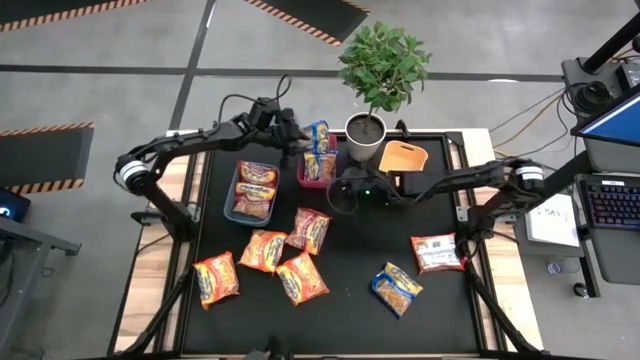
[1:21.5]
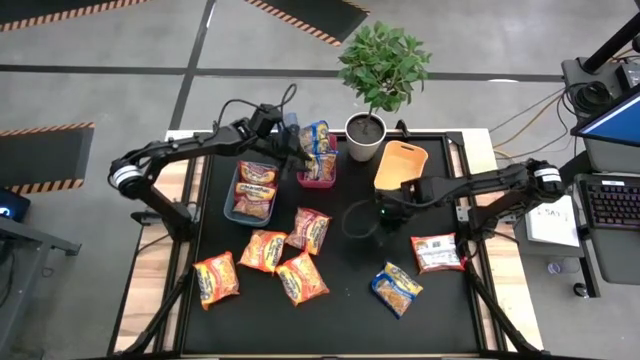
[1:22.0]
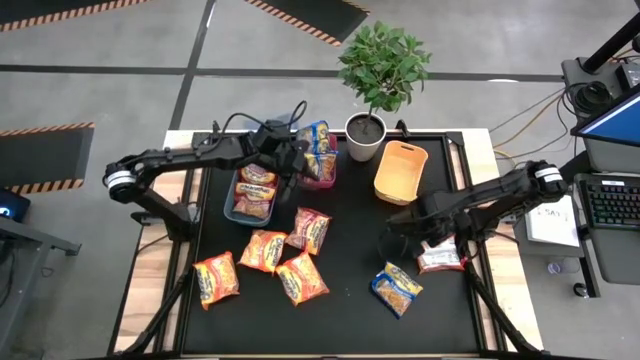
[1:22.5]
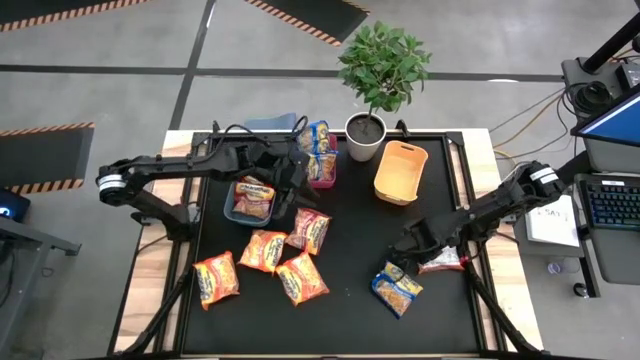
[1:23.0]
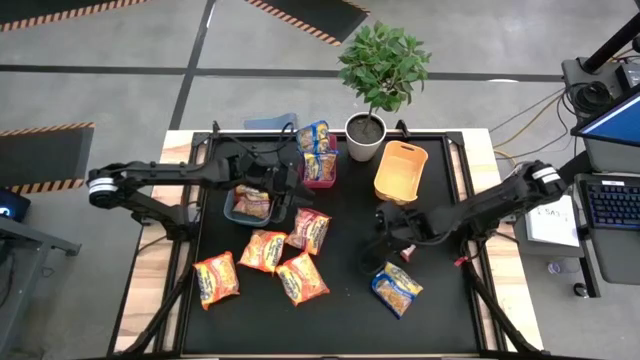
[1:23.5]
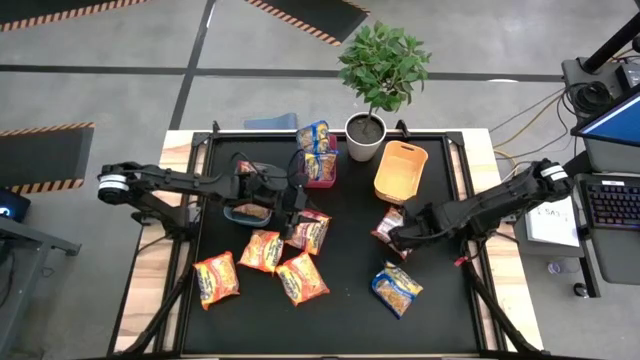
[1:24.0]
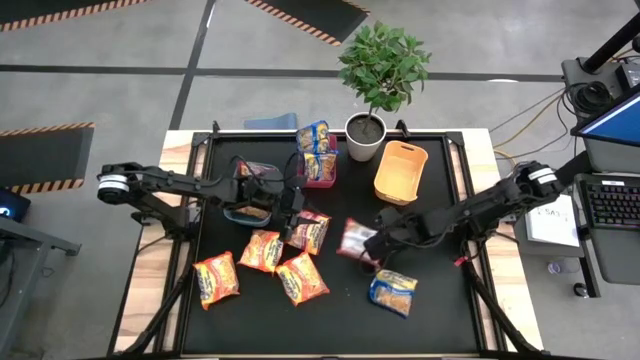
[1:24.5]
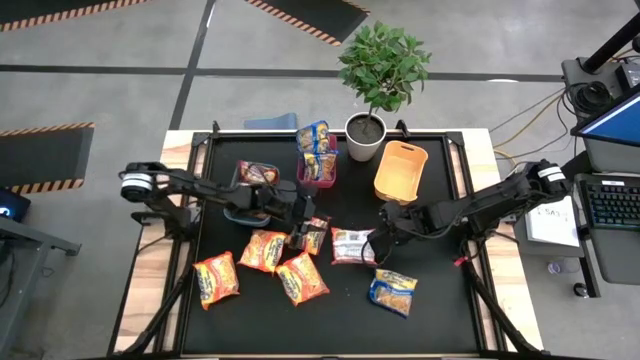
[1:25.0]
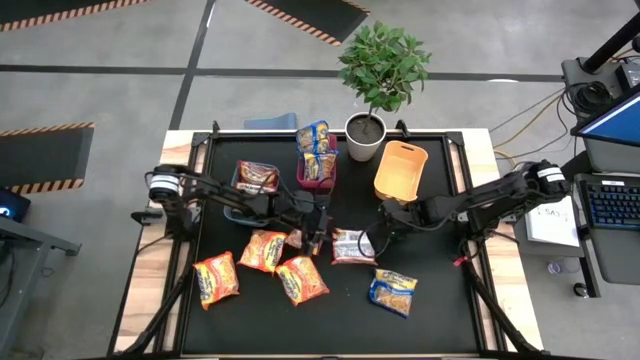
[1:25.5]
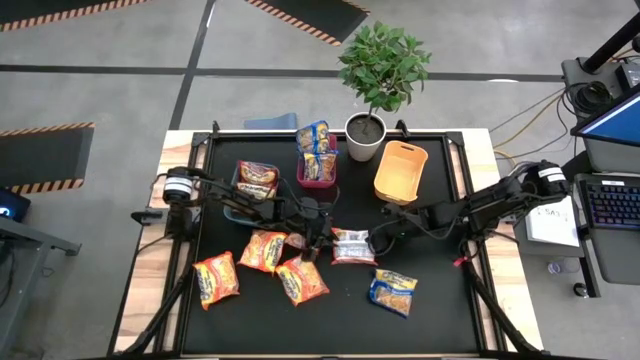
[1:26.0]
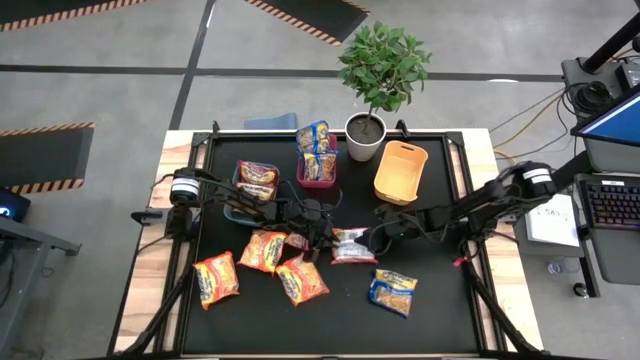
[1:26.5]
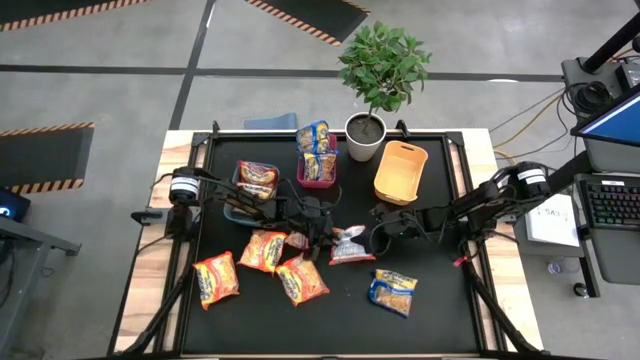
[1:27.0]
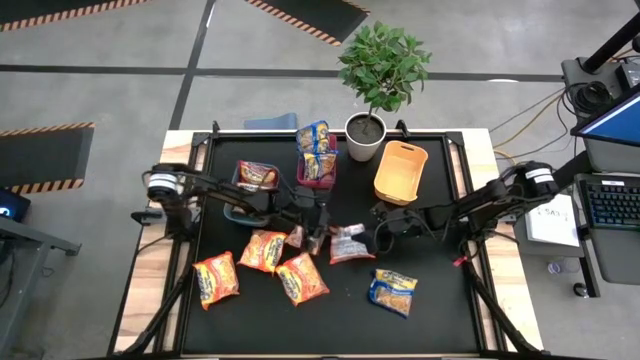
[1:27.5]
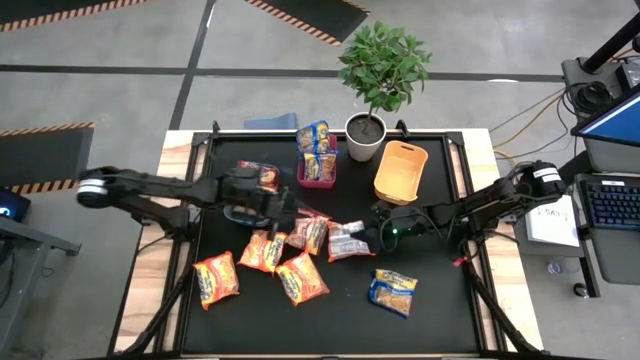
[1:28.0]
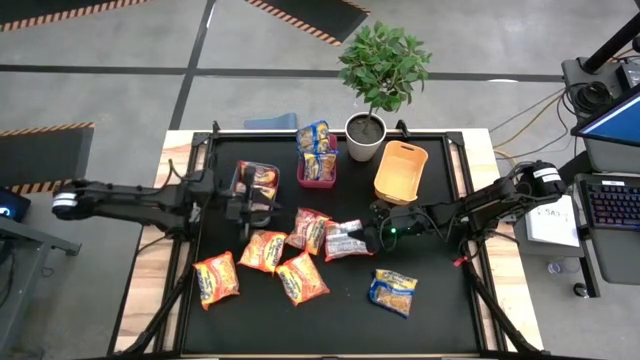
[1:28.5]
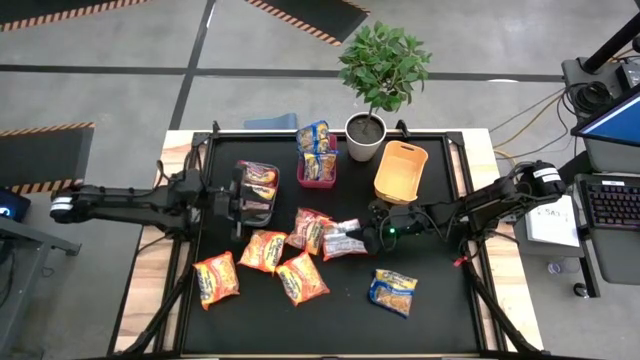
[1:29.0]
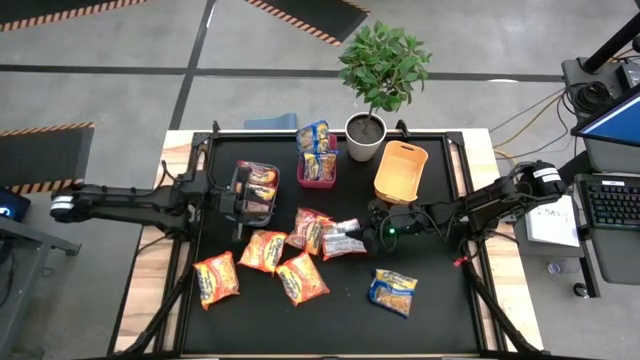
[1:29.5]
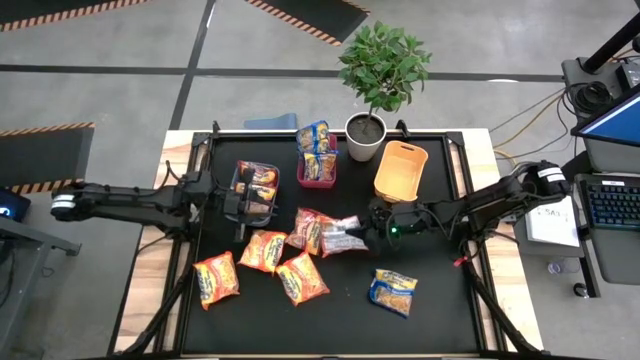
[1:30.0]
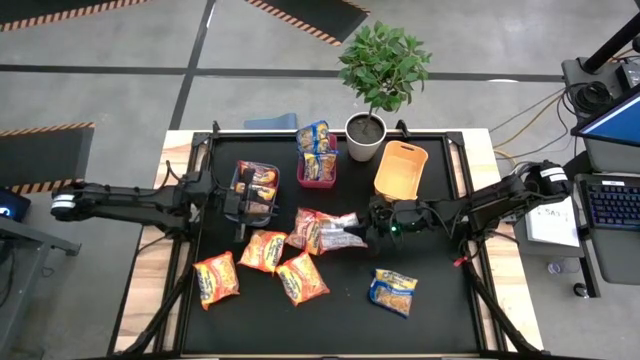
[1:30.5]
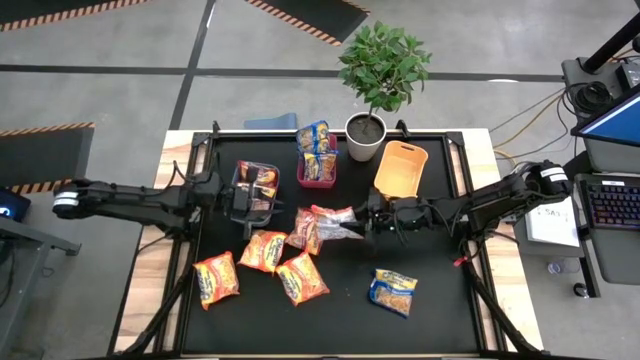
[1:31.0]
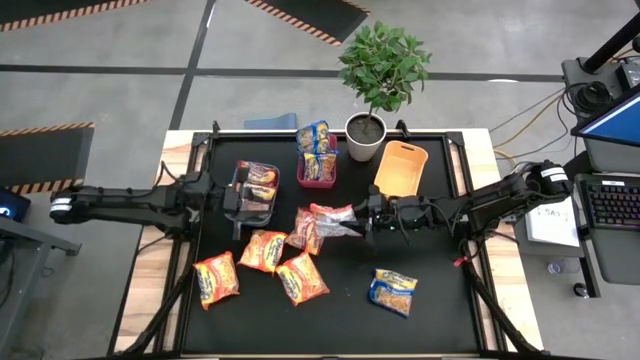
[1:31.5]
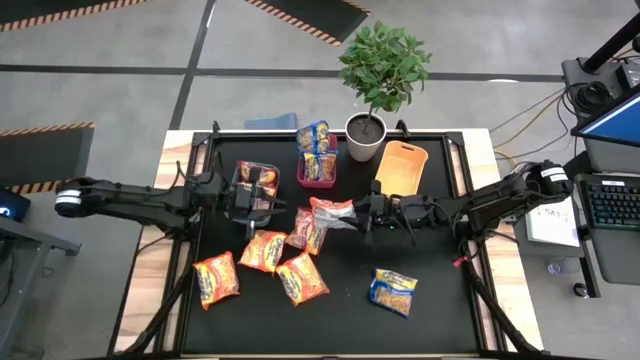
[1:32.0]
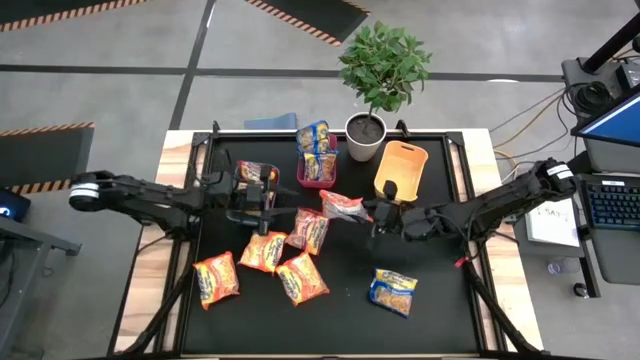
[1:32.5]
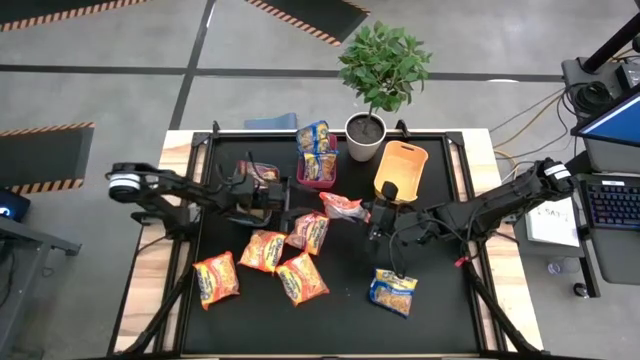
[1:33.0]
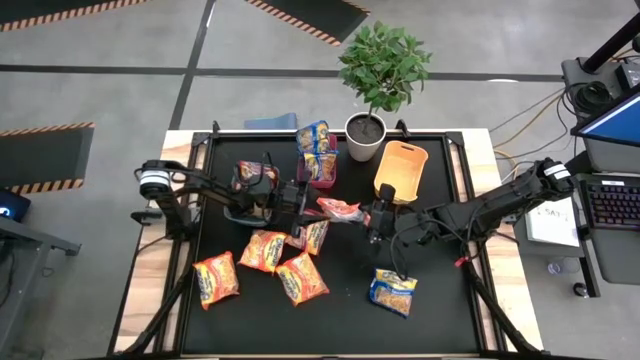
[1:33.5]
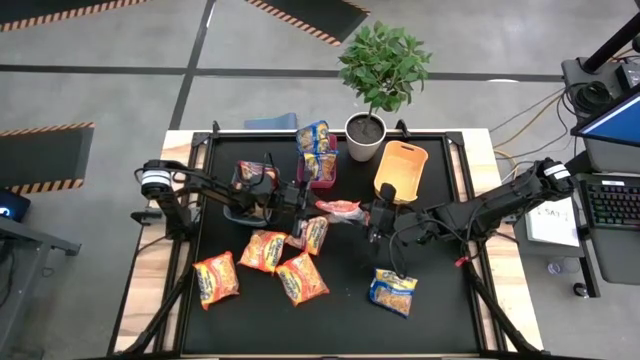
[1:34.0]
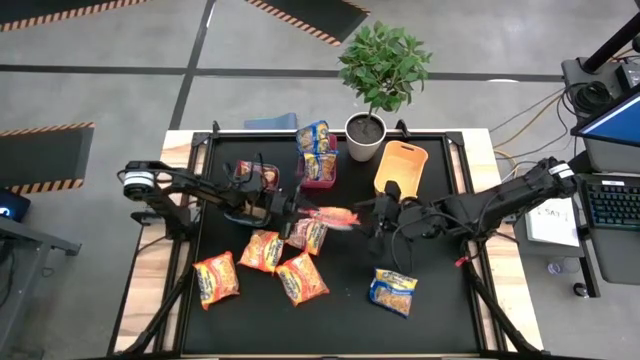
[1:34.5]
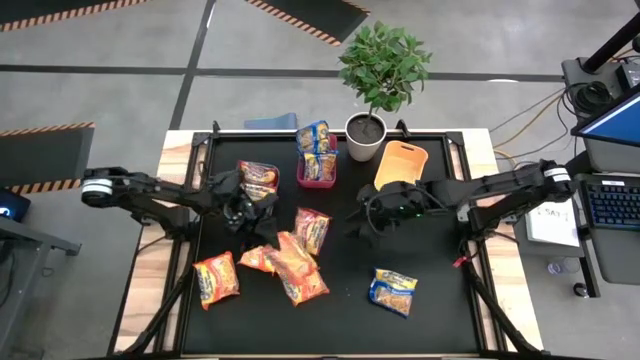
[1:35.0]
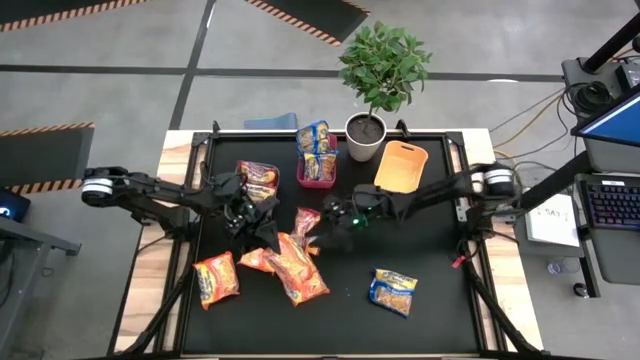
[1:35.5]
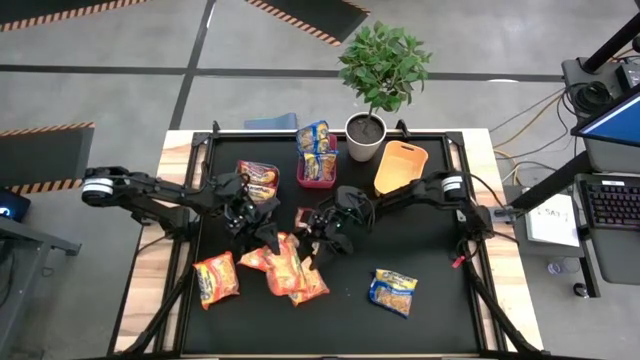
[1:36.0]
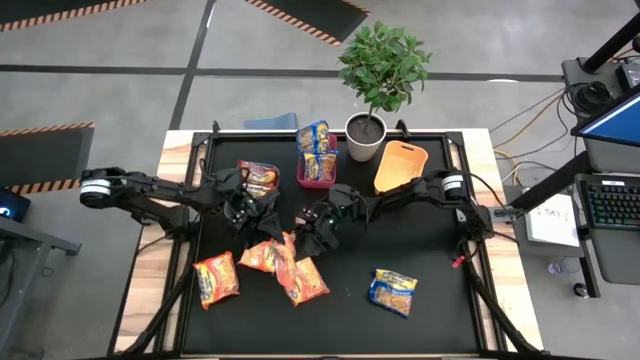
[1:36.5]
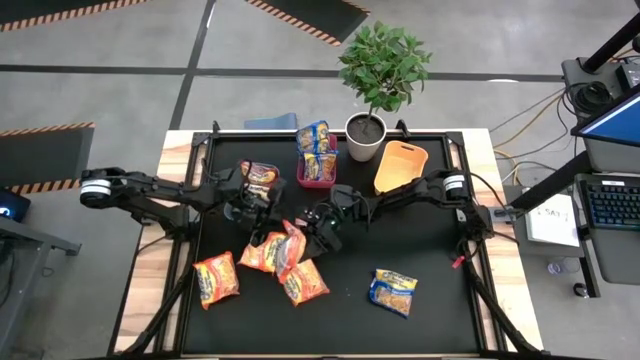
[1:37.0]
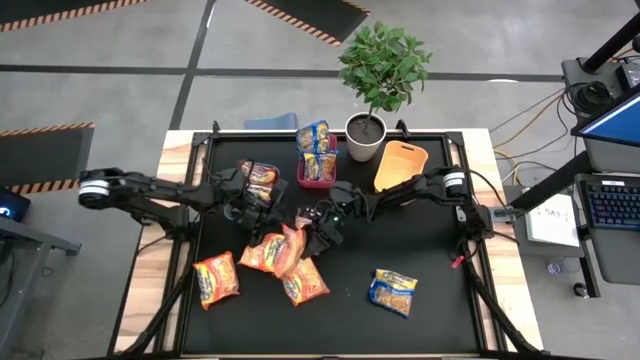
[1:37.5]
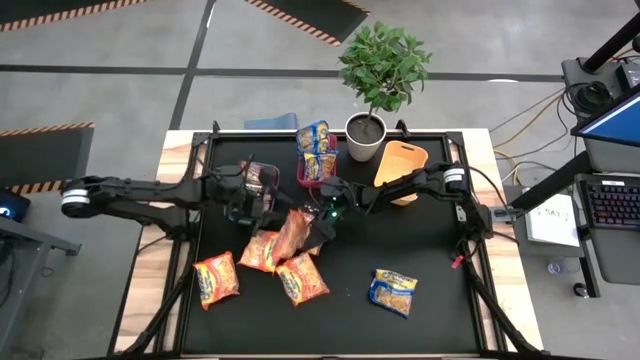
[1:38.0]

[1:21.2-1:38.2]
Task: Sort Maruchan noodles
Put the orange noodle pack into the yellow bin

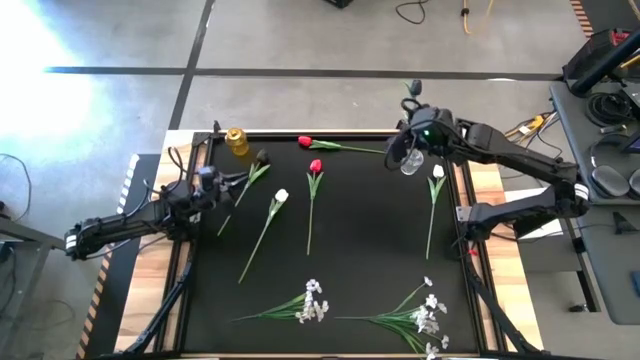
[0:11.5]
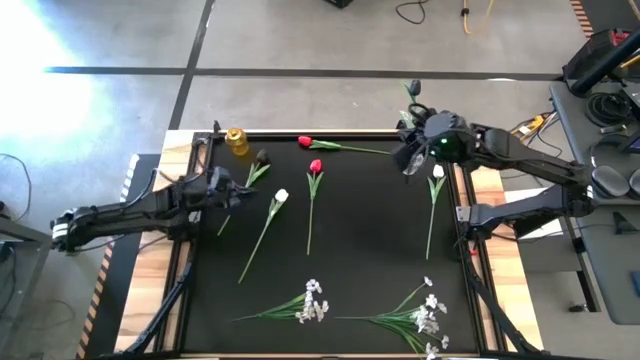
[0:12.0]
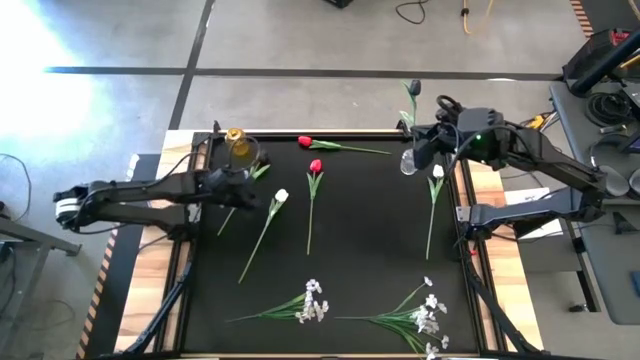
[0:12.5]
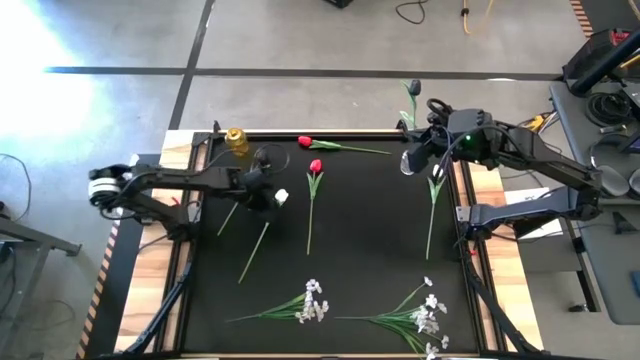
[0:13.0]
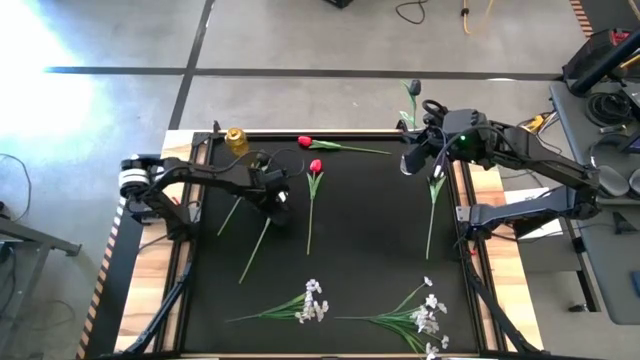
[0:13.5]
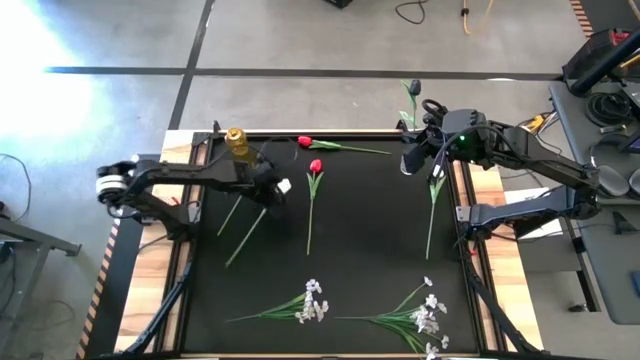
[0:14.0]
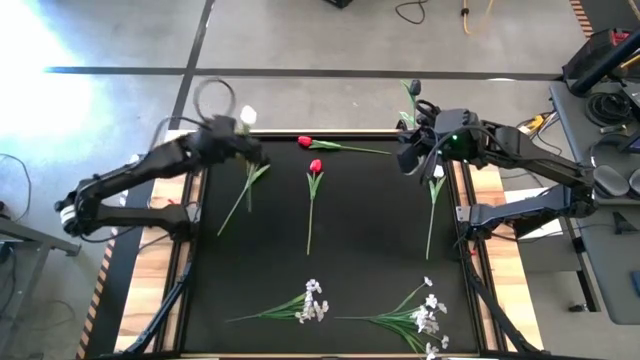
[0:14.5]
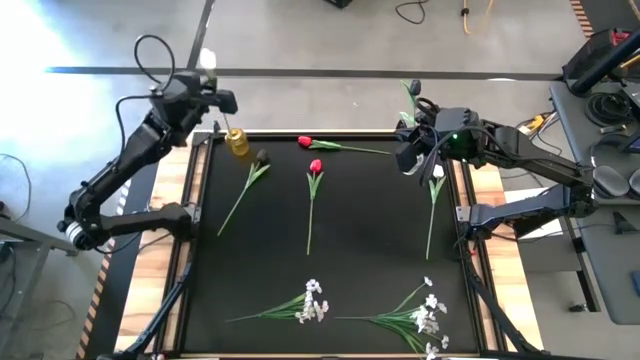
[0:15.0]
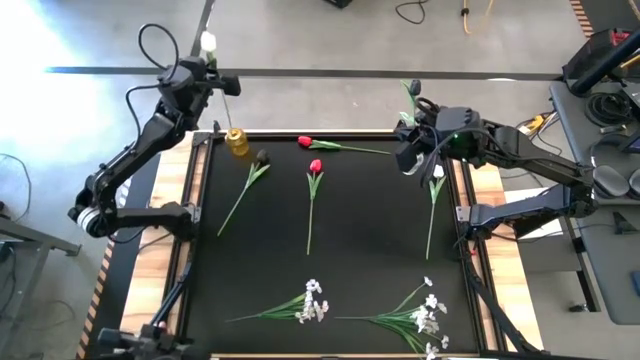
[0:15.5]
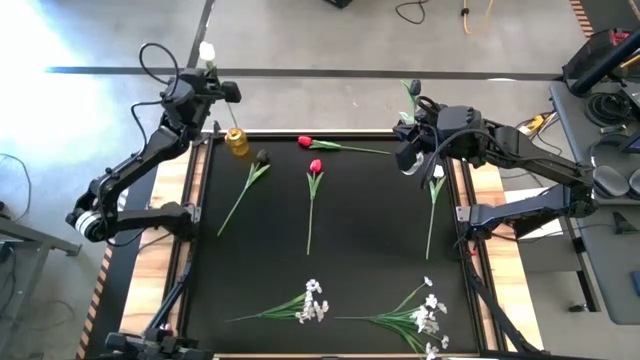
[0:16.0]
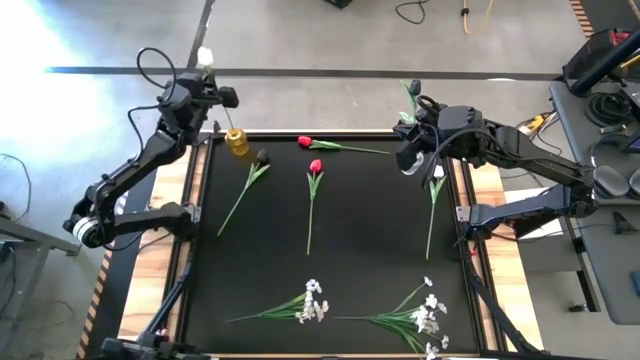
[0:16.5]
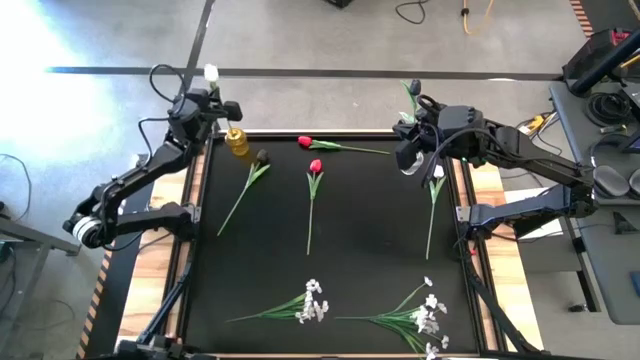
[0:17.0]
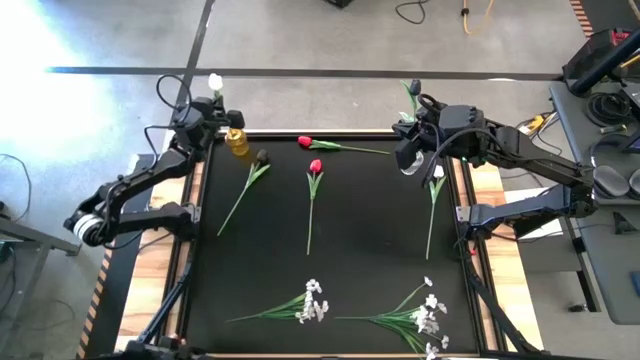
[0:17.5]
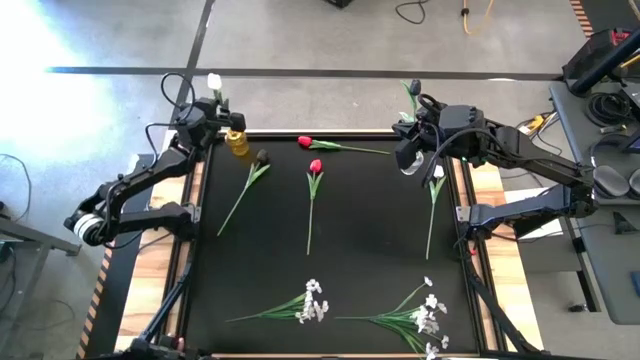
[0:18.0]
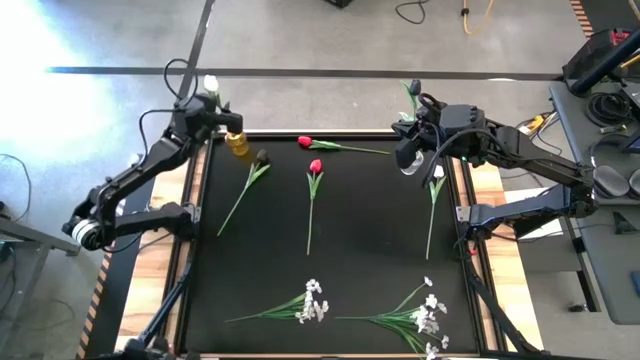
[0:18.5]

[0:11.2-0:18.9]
Task: Sort flowers into vase by color
Put the left white tulip into the yellow vase
